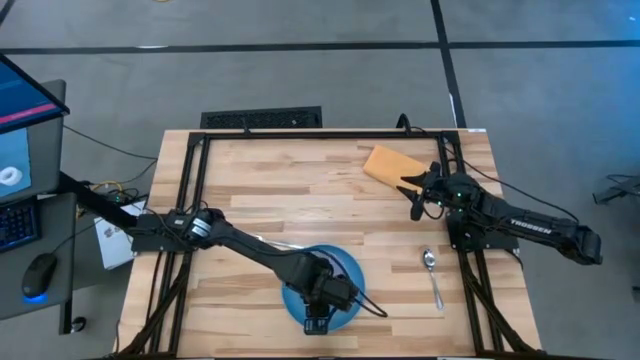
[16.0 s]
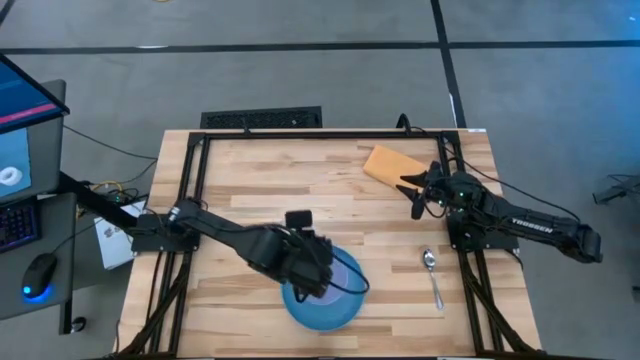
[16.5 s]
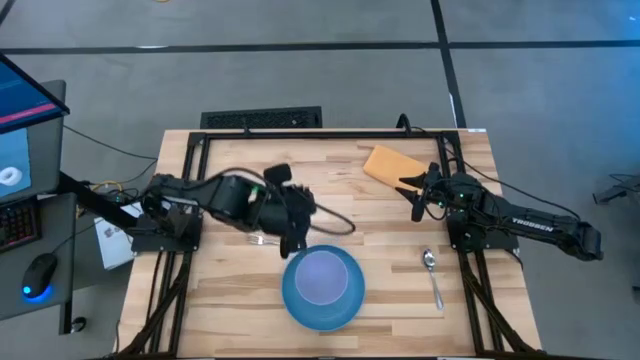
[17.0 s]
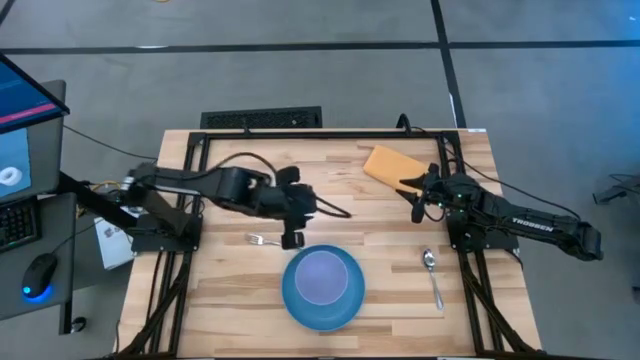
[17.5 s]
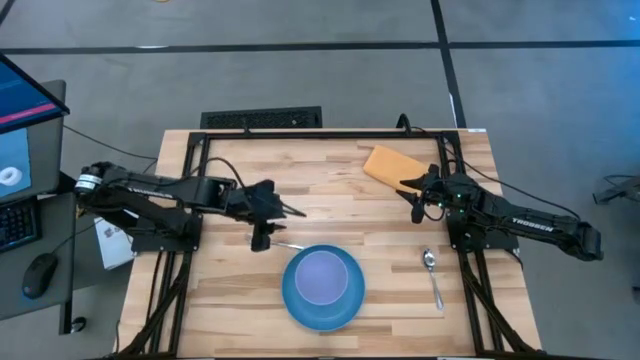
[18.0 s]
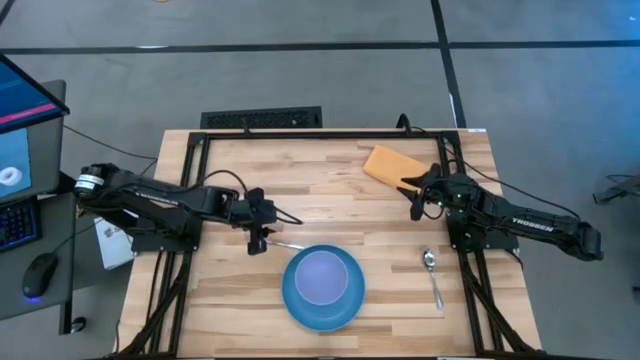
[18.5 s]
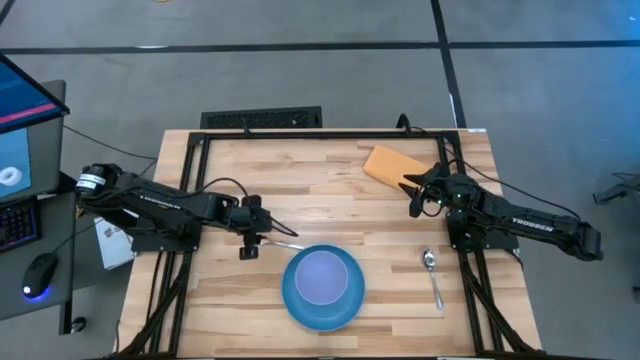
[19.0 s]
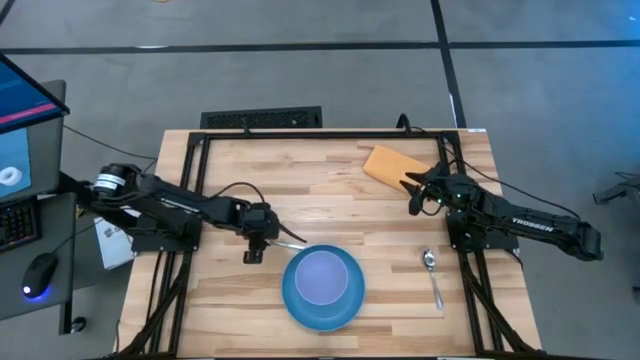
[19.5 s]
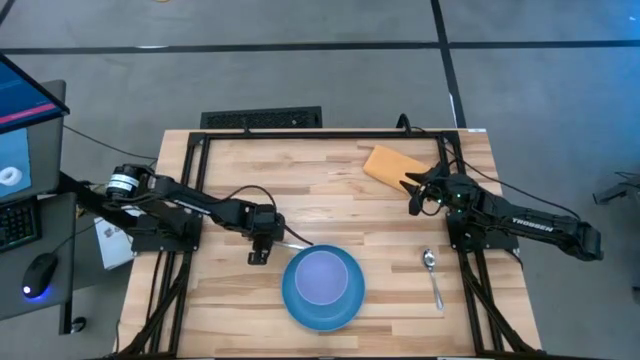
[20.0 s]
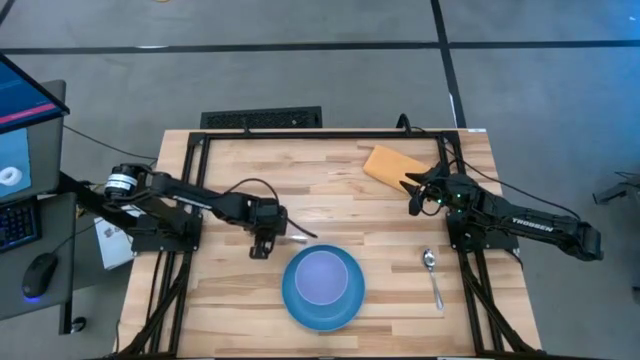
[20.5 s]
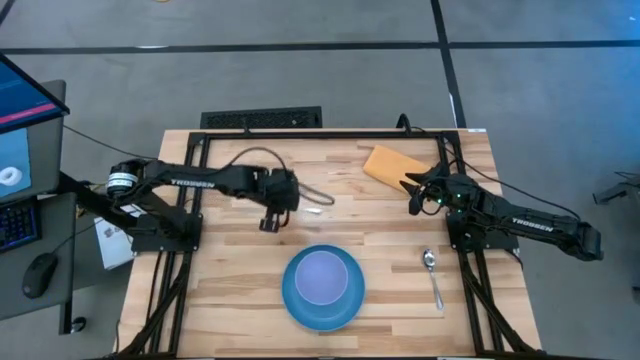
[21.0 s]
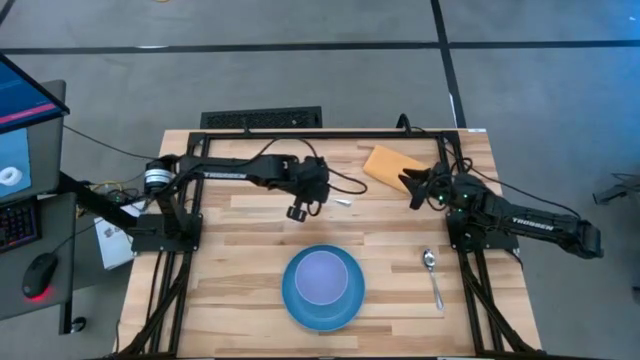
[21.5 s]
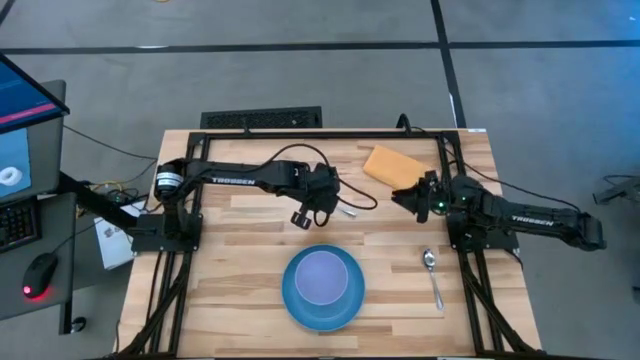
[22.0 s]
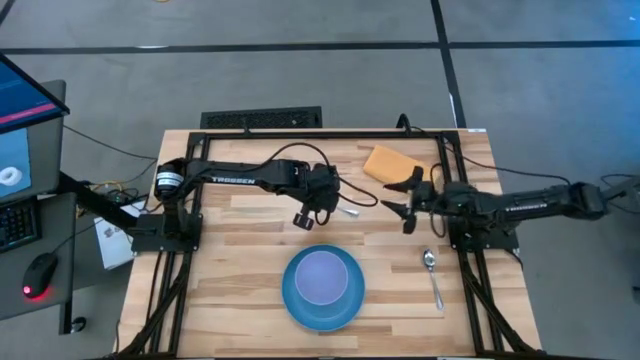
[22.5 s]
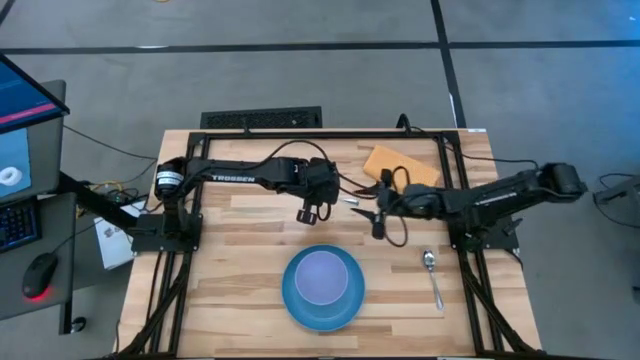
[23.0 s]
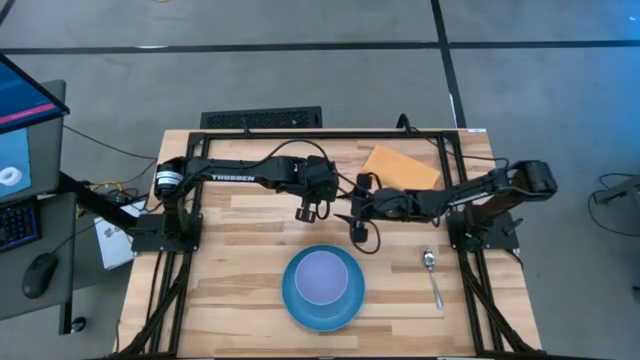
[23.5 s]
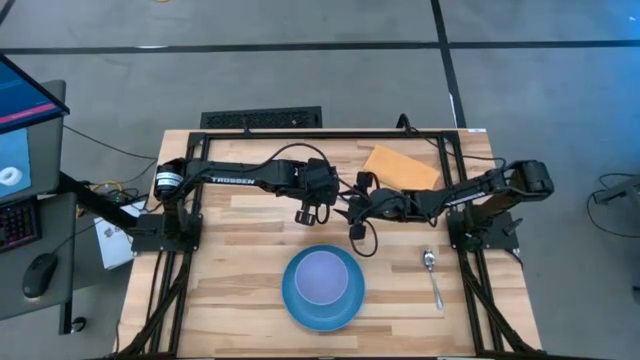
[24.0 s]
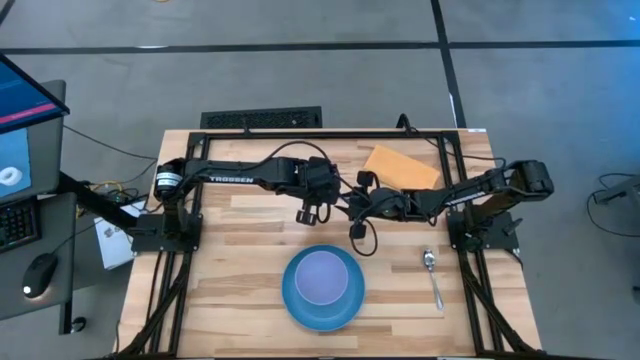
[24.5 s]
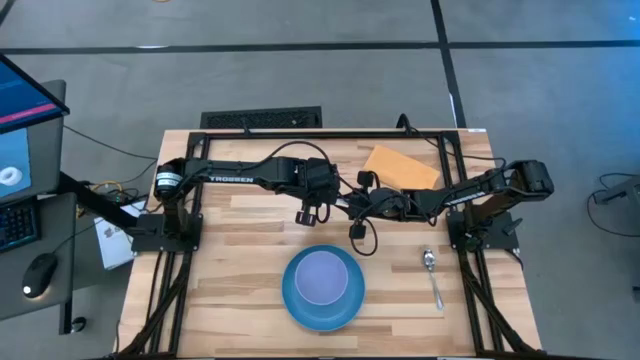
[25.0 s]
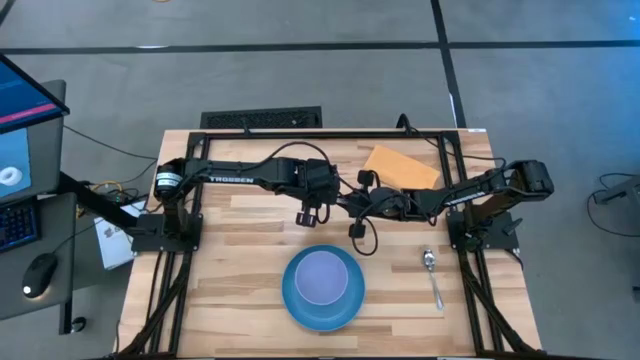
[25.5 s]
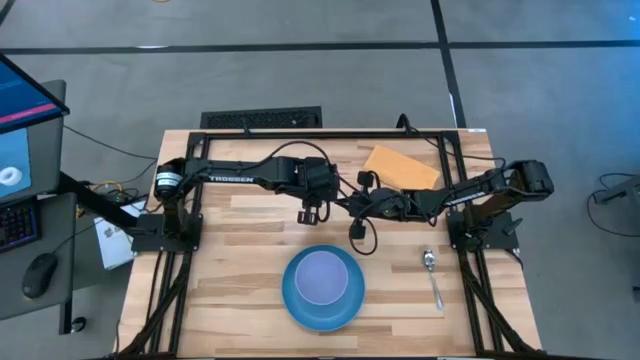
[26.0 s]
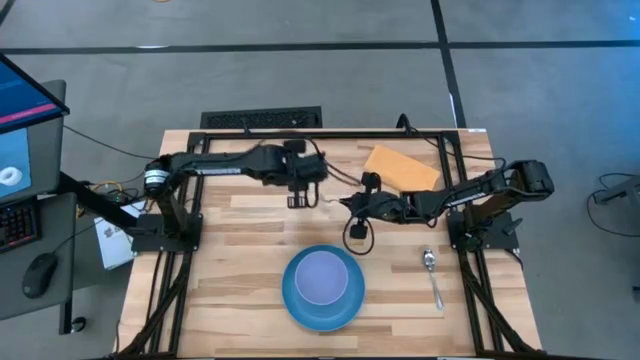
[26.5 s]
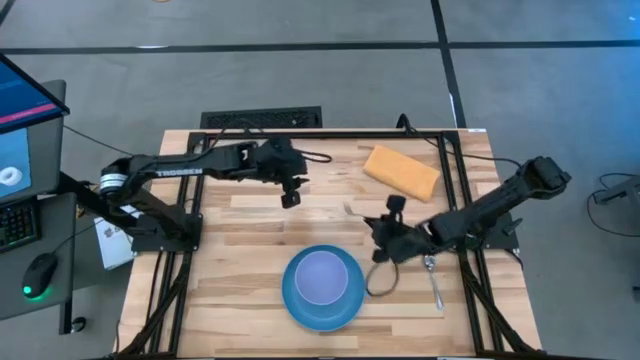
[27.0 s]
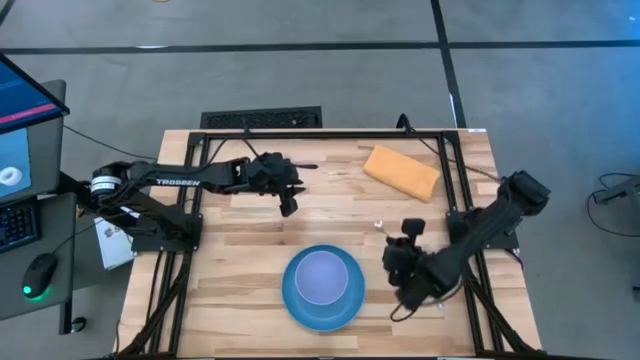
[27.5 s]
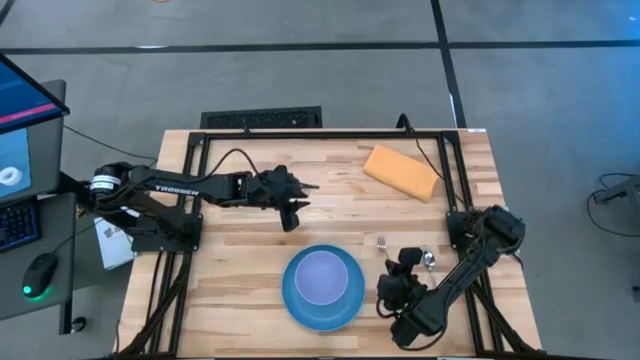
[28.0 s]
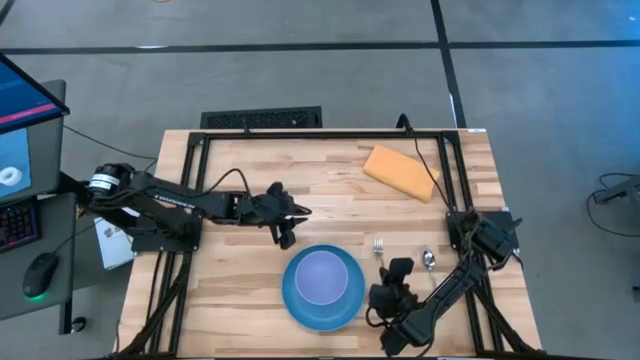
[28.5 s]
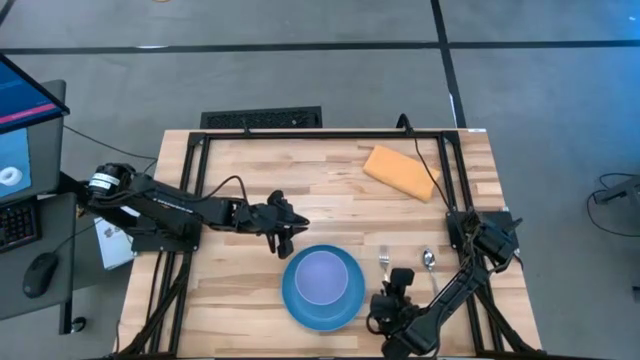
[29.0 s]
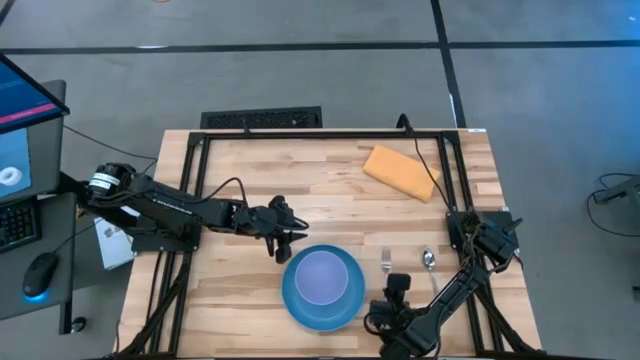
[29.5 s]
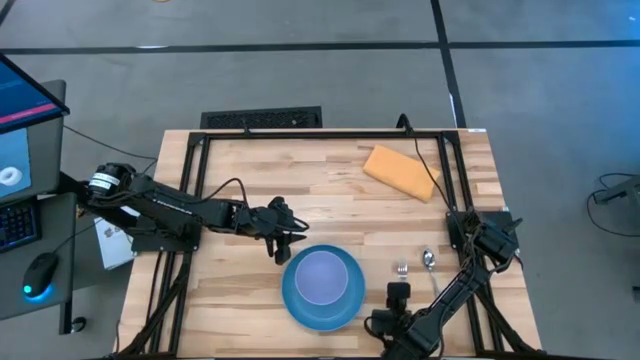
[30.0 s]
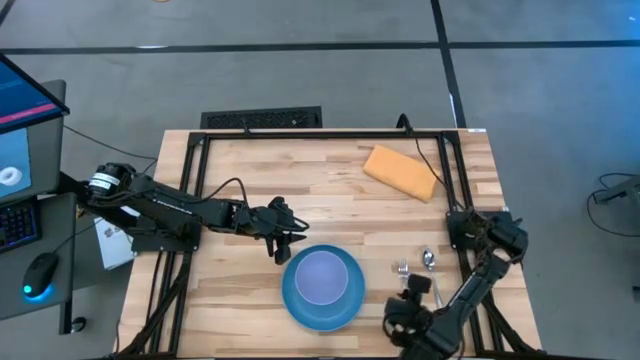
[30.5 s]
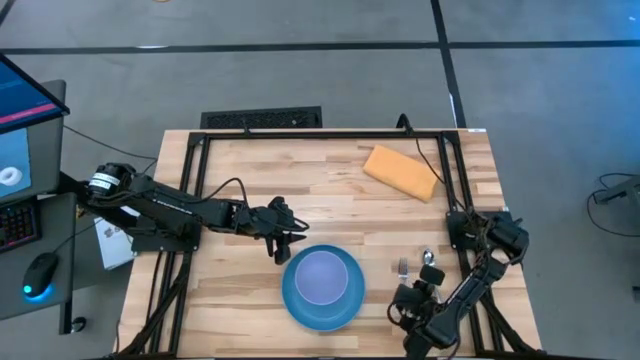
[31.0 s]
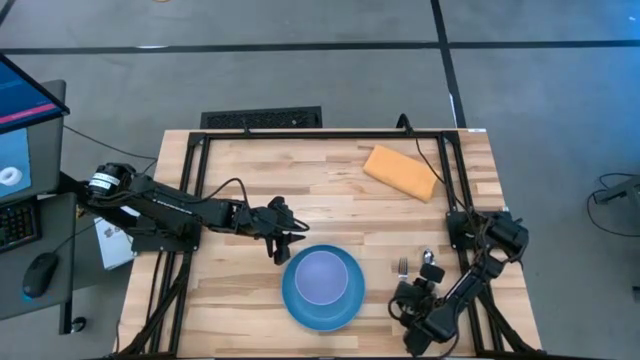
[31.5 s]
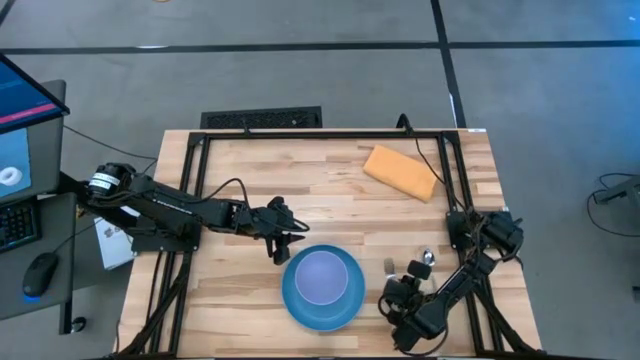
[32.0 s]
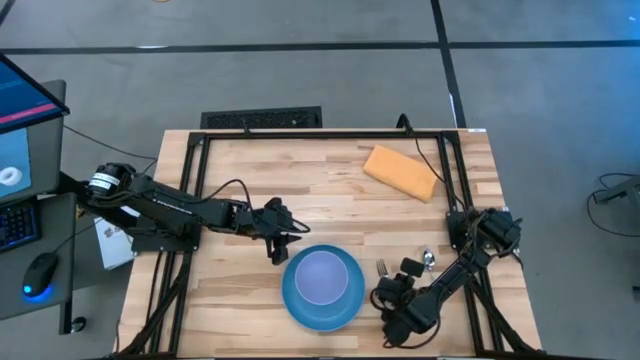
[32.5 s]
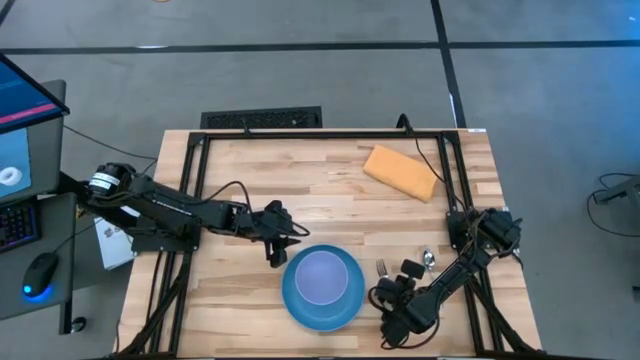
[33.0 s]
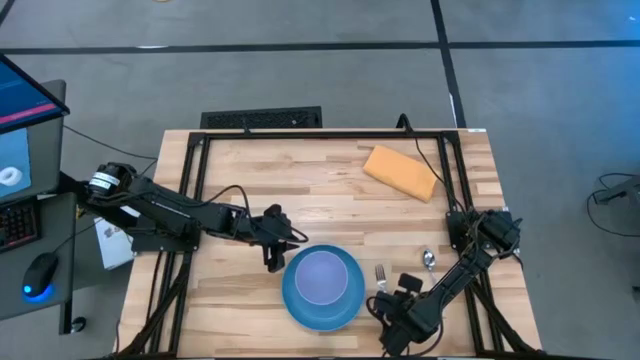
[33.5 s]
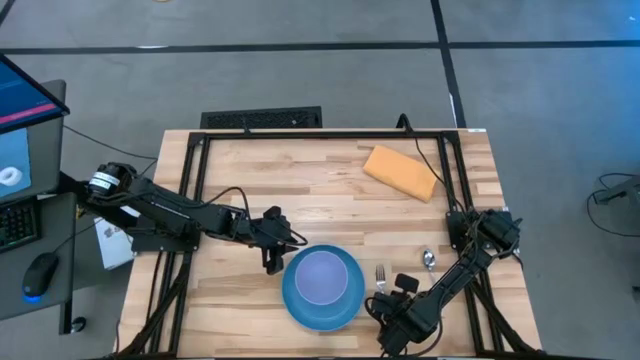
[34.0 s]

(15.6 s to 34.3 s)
Task: Set table place
Move the silver fork beside the blue plate

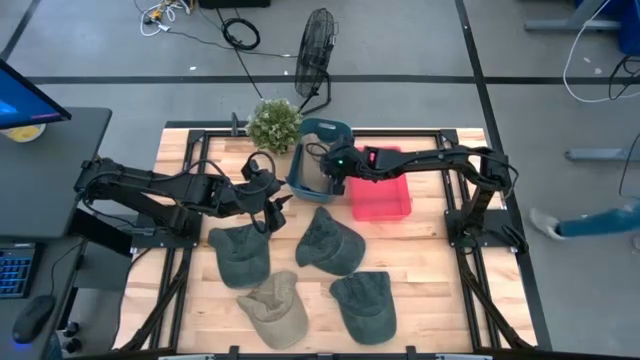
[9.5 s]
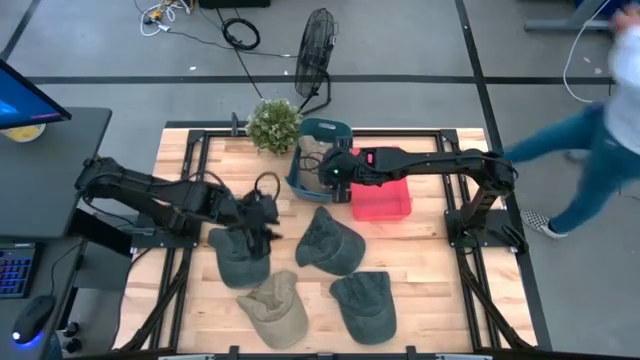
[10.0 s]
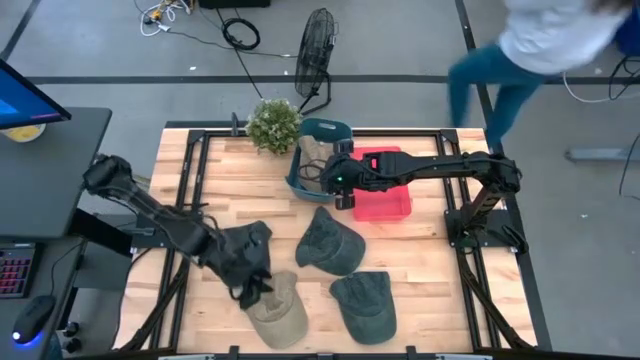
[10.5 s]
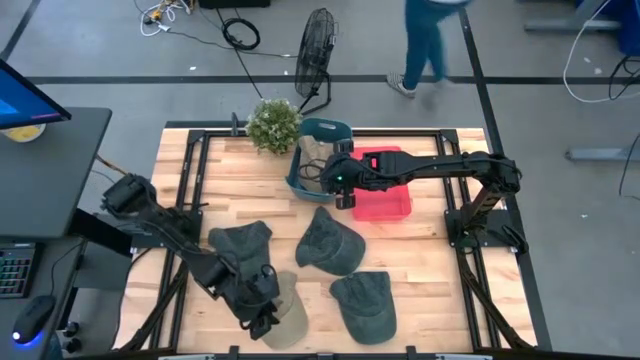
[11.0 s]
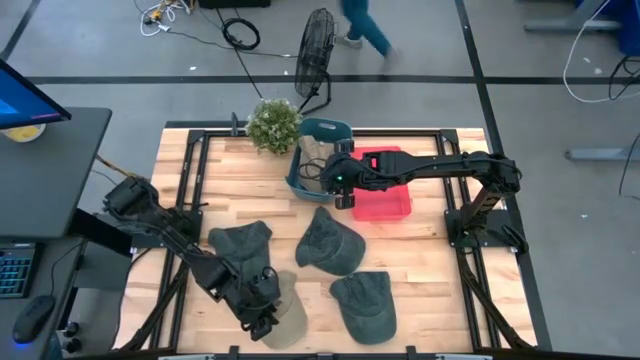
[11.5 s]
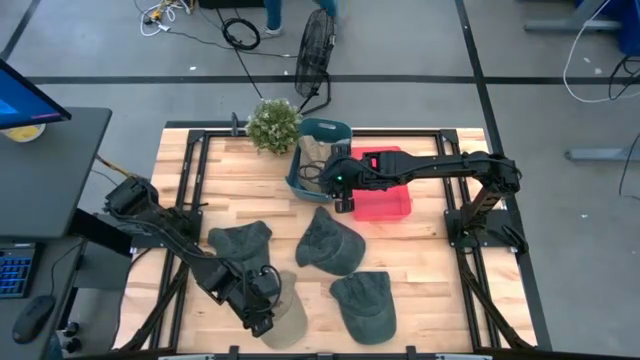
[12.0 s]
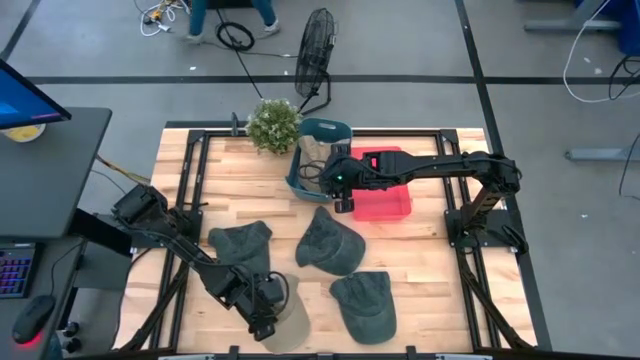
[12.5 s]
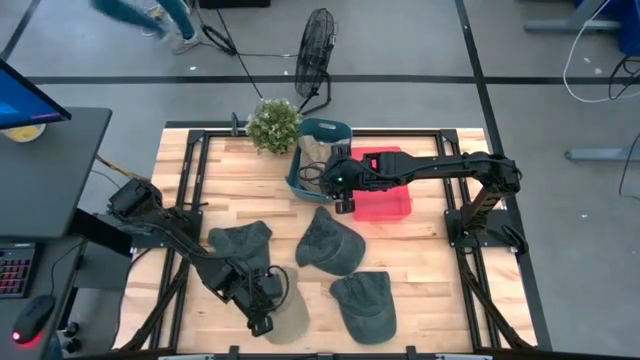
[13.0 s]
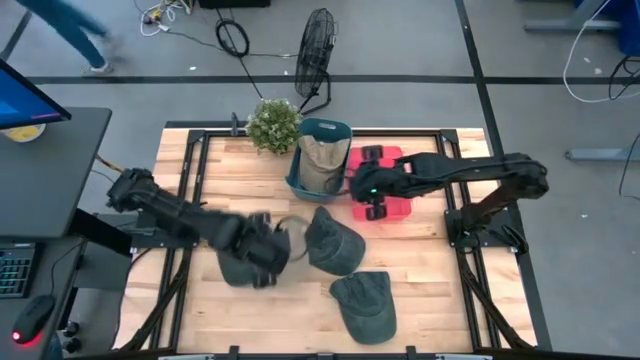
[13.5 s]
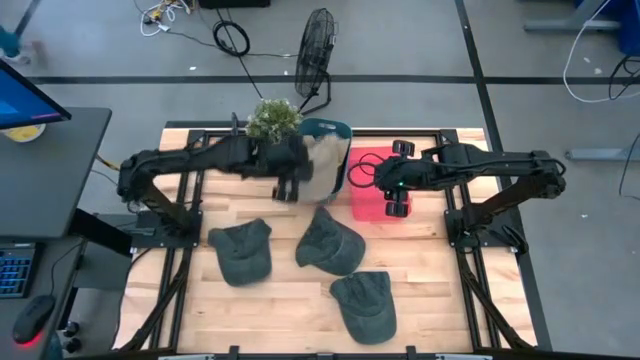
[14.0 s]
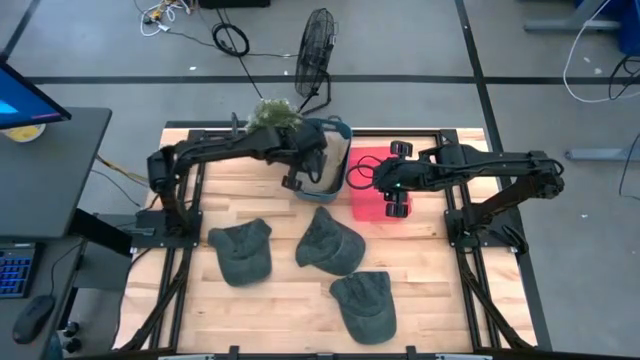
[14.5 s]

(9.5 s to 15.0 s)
Task: Pick & Place hat
Put the brown cap into the blue bin
